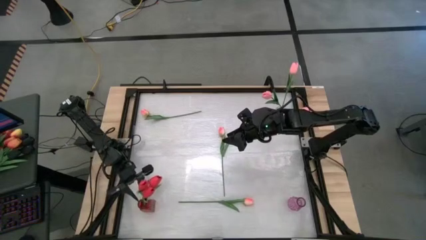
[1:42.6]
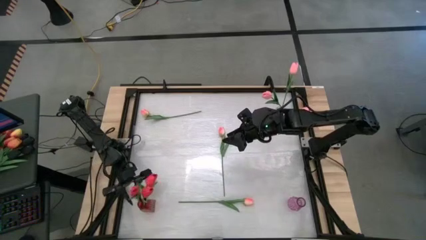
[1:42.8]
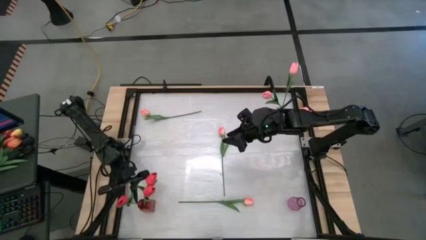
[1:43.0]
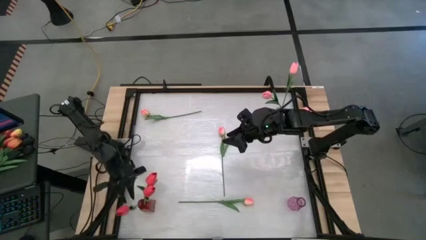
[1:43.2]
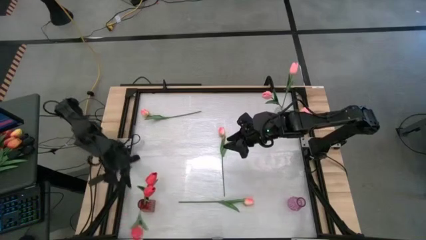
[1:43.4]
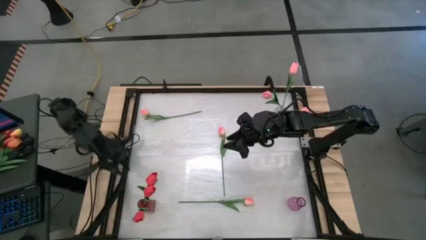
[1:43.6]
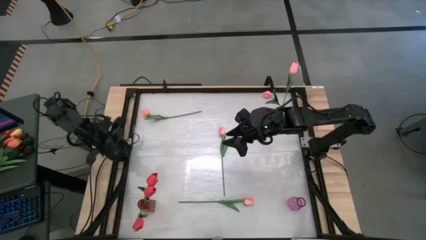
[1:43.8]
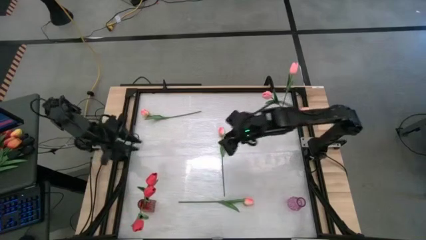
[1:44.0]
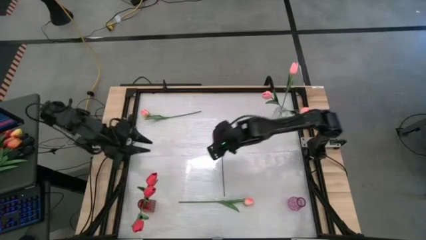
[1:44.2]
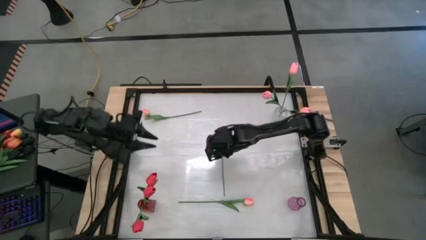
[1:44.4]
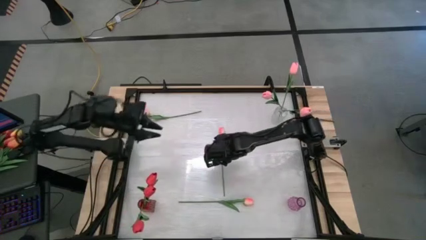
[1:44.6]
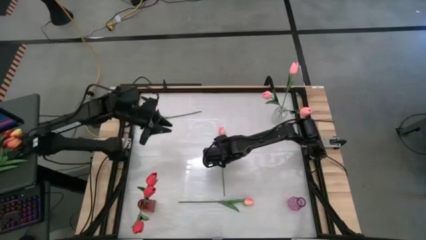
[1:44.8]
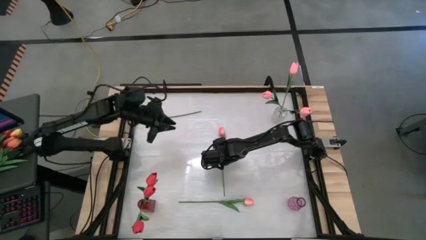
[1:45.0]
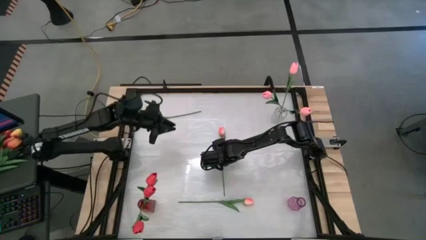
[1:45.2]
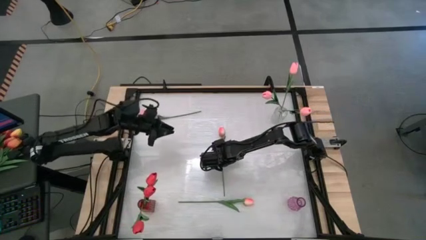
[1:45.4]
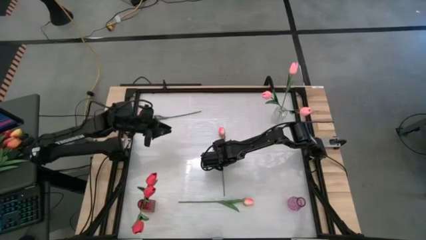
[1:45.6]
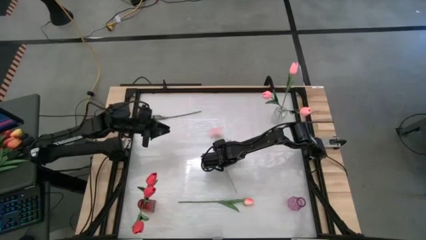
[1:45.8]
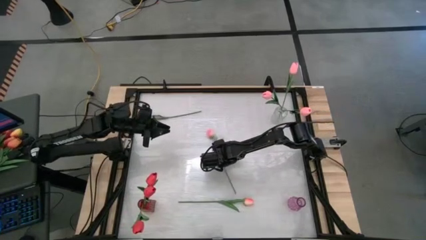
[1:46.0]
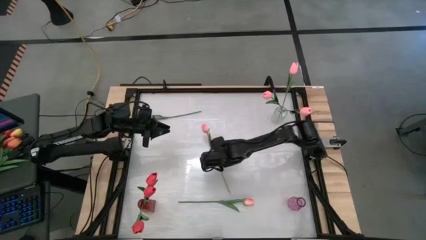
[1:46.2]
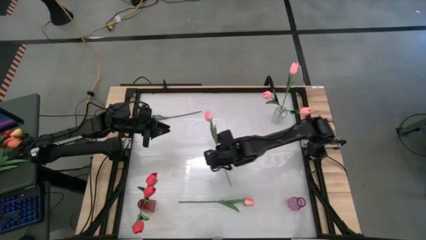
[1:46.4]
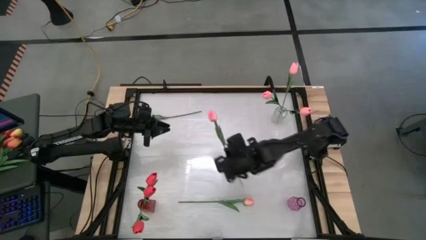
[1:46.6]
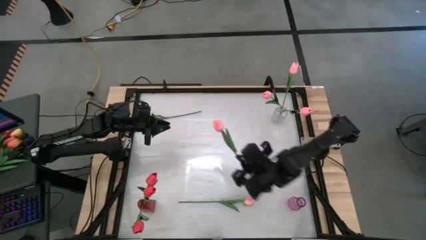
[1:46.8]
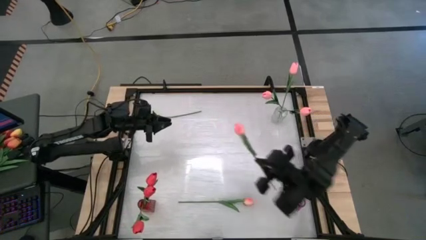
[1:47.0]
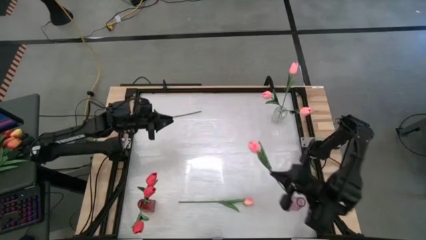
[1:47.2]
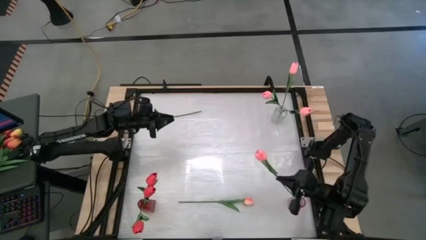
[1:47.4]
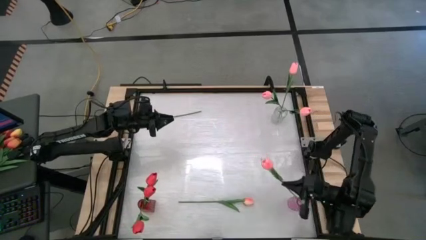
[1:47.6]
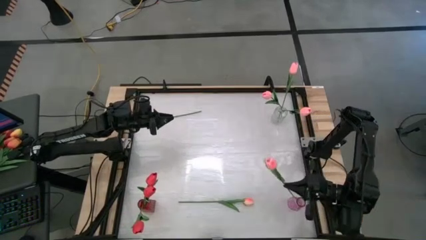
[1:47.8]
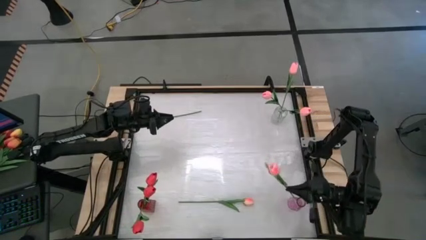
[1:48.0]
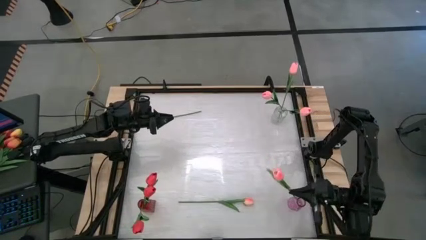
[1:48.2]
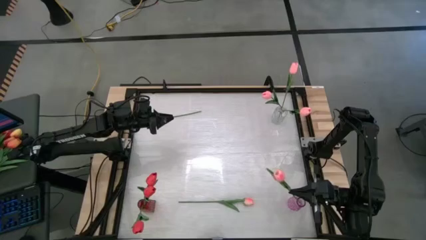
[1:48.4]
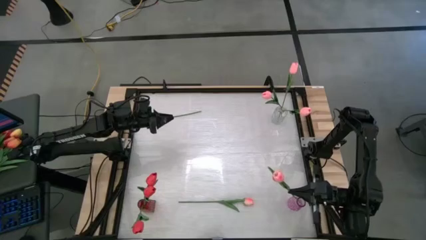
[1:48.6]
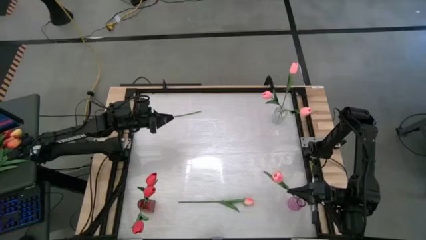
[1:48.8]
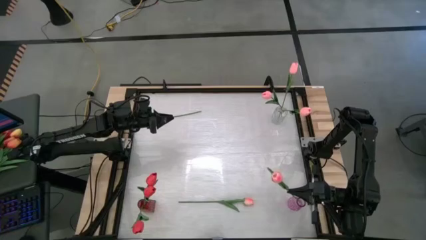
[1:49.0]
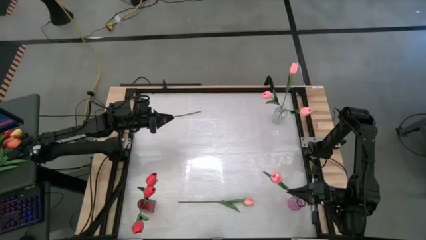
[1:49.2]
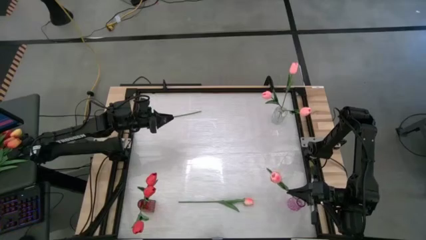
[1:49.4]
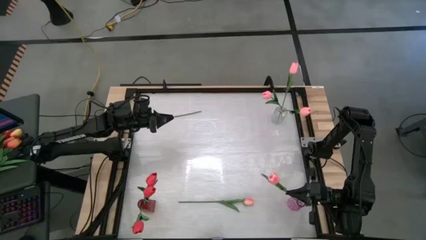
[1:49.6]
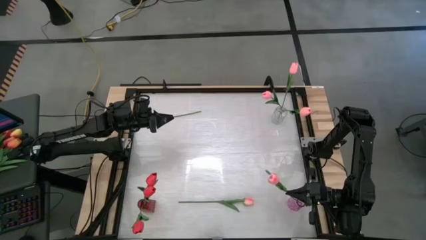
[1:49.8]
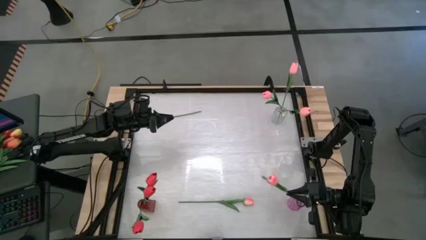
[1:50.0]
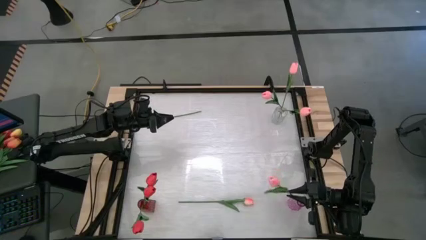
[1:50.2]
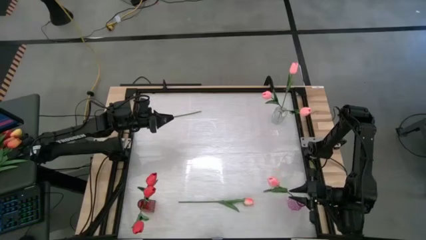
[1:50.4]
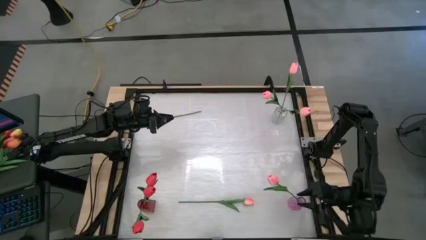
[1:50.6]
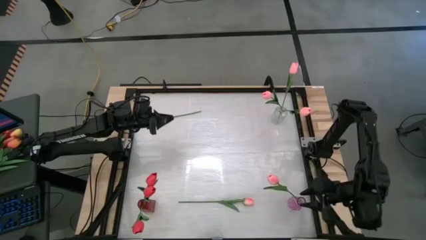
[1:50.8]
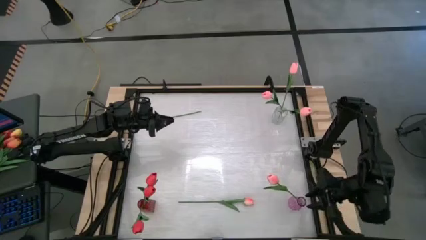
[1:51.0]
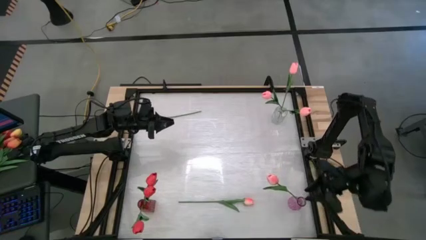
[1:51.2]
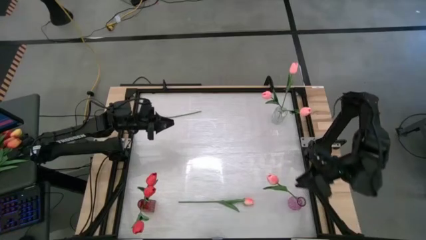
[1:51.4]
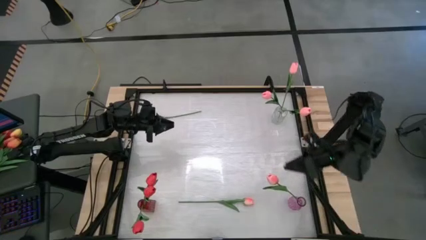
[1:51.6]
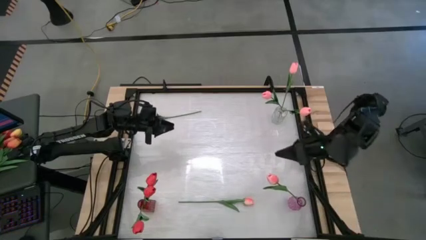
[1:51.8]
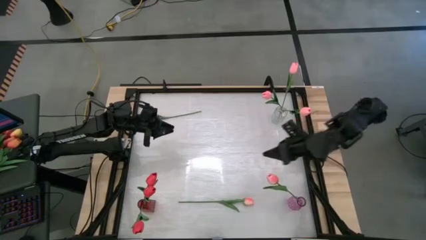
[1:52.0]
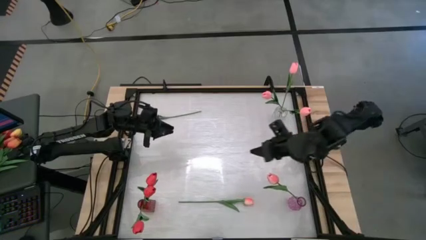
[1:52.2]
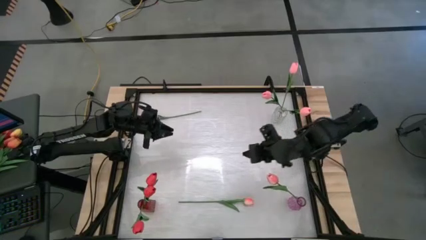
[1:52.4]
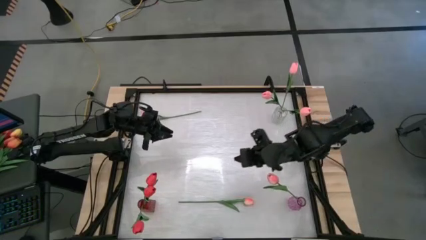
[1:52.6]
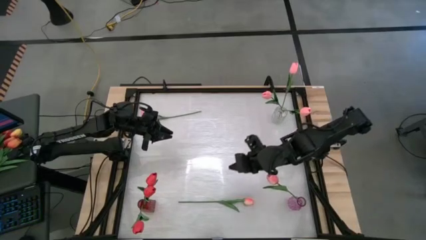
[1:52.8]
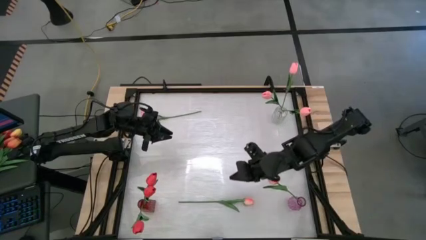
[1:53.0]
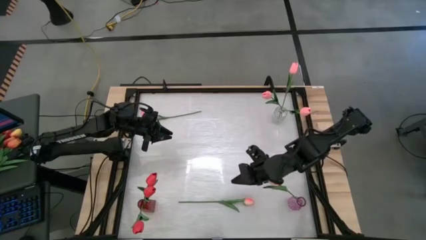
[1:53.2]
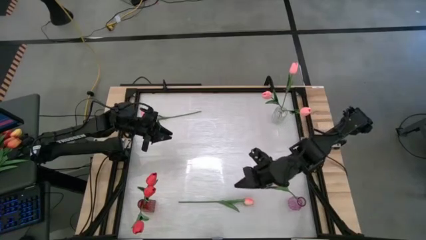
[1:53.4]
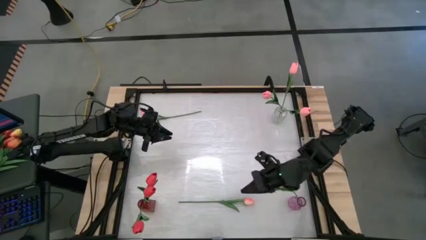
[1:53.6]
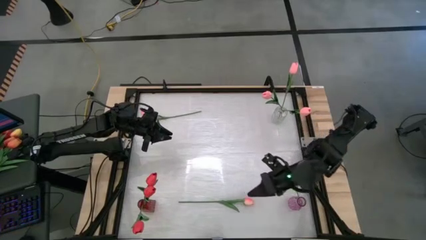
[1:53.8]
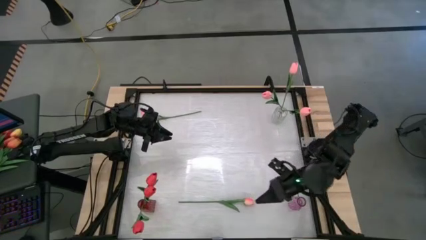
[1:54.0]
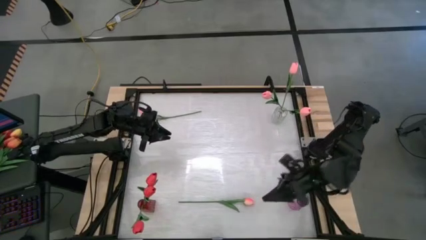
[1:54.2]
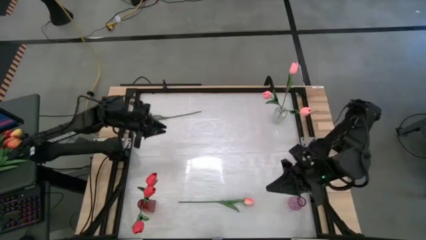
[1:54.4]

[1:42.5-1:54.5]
Task: Sort flowers into vase by color
Put the pink flower in the pink vase
